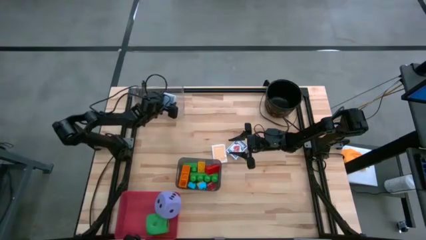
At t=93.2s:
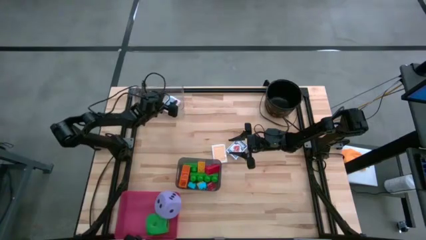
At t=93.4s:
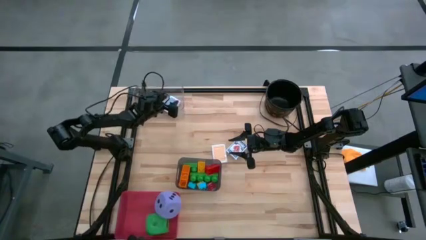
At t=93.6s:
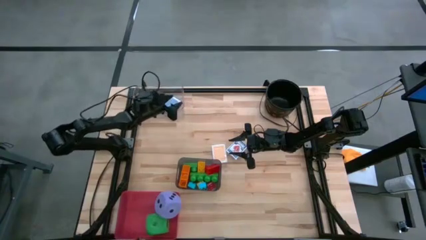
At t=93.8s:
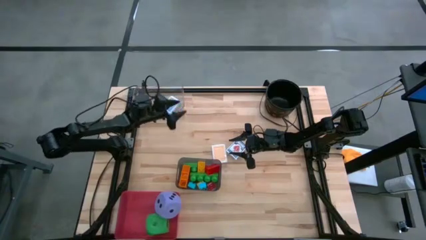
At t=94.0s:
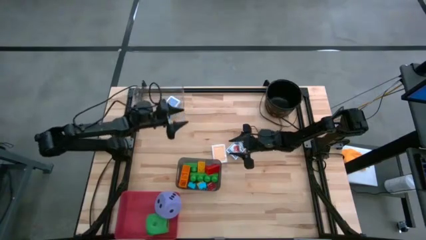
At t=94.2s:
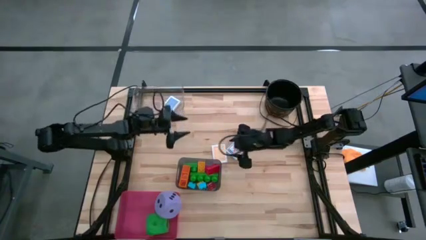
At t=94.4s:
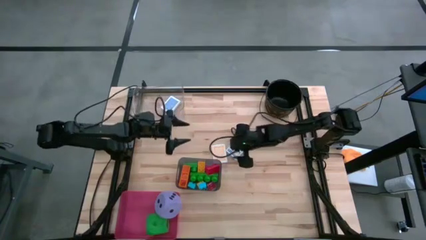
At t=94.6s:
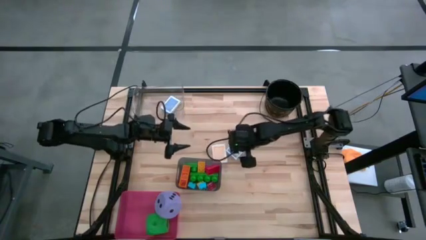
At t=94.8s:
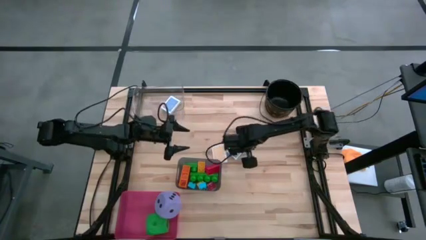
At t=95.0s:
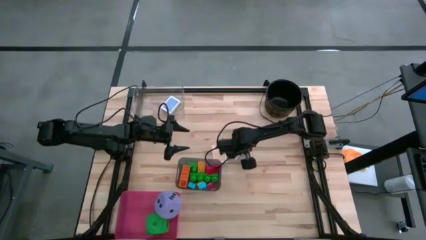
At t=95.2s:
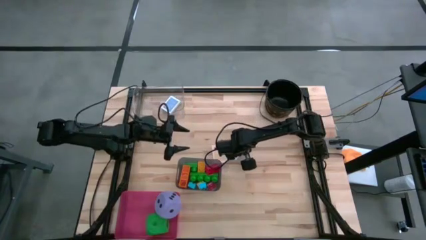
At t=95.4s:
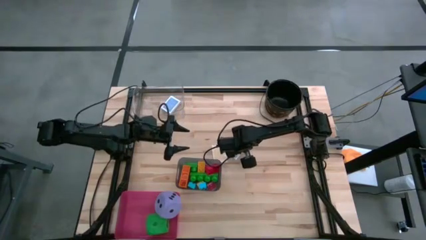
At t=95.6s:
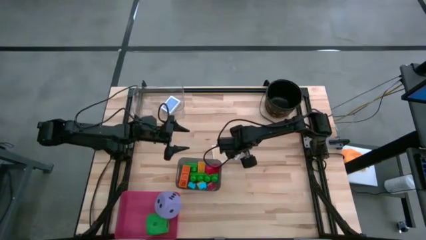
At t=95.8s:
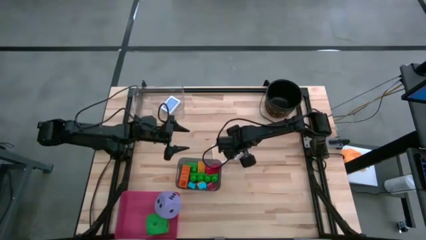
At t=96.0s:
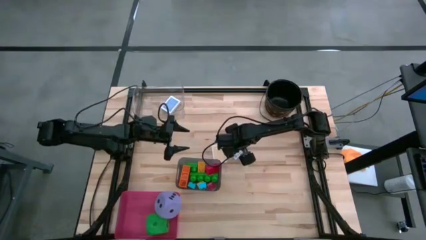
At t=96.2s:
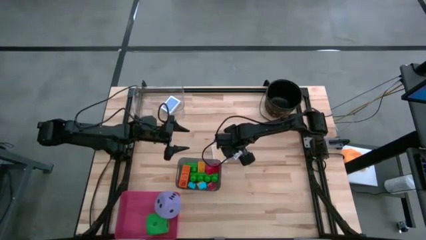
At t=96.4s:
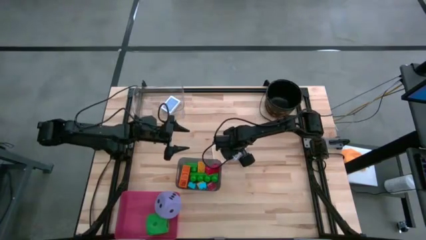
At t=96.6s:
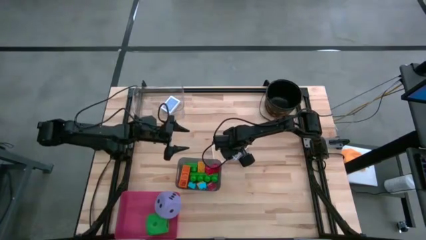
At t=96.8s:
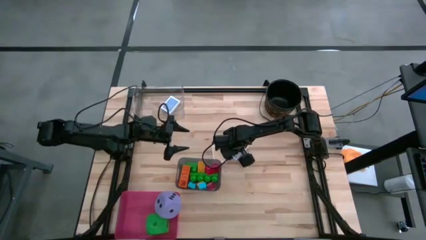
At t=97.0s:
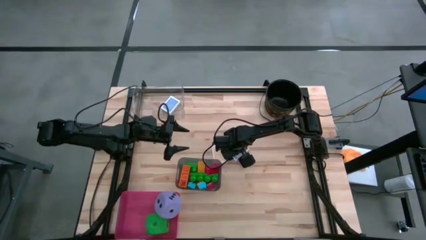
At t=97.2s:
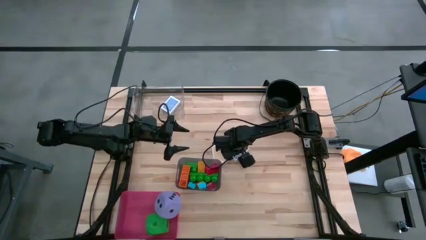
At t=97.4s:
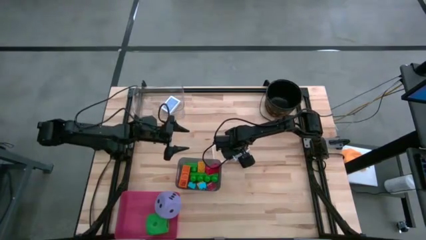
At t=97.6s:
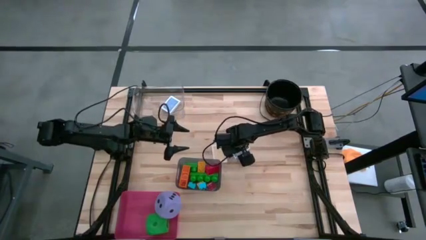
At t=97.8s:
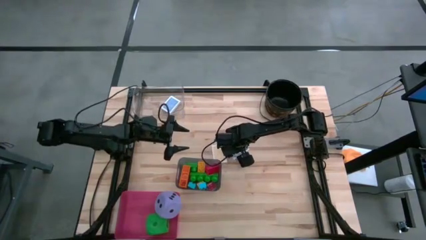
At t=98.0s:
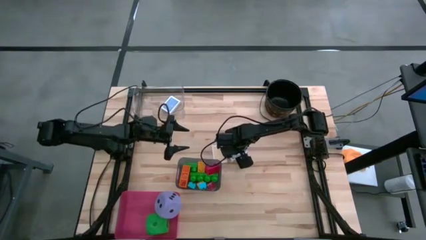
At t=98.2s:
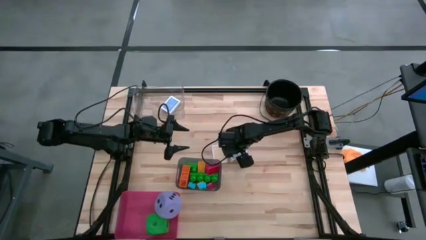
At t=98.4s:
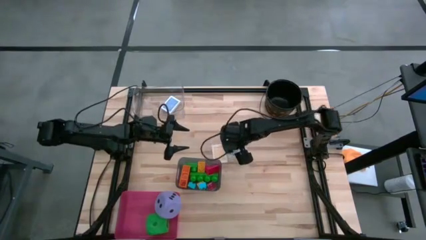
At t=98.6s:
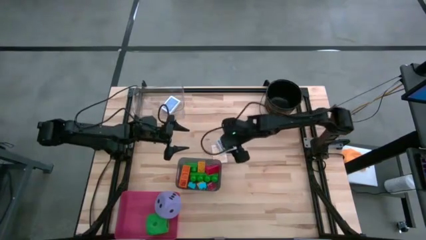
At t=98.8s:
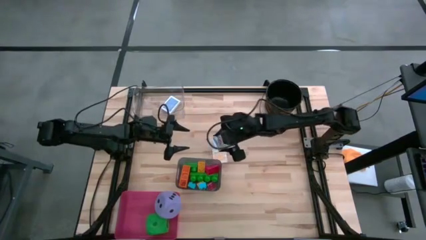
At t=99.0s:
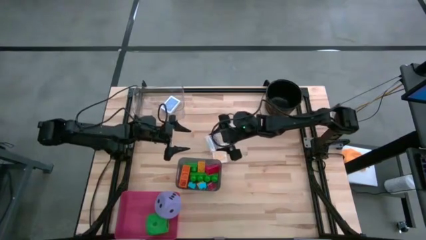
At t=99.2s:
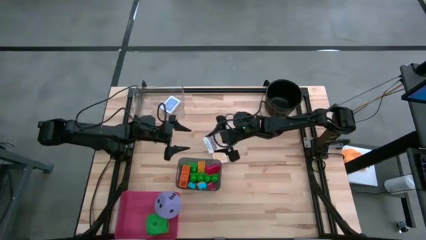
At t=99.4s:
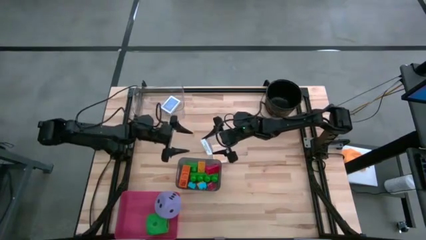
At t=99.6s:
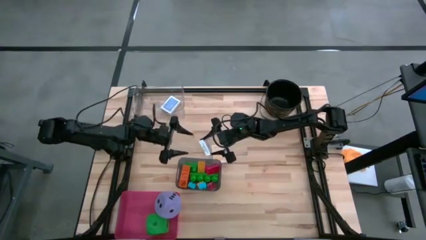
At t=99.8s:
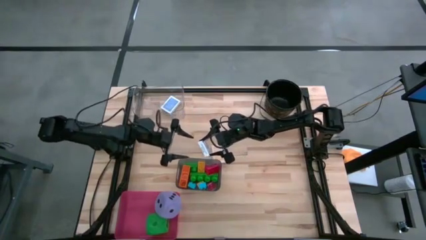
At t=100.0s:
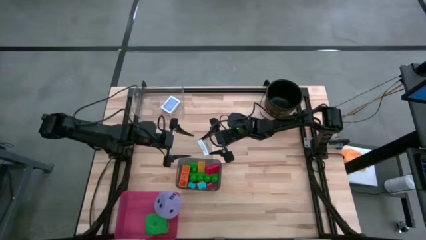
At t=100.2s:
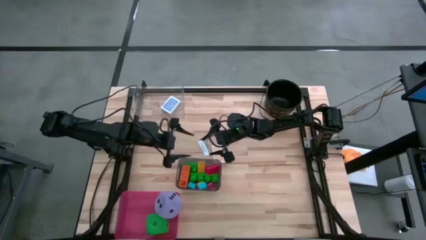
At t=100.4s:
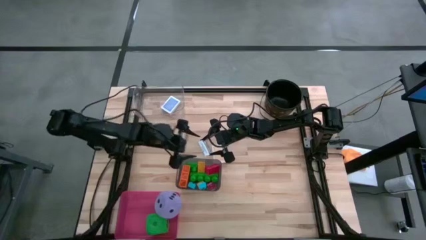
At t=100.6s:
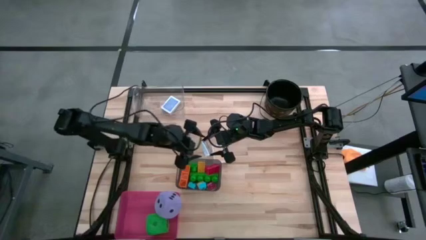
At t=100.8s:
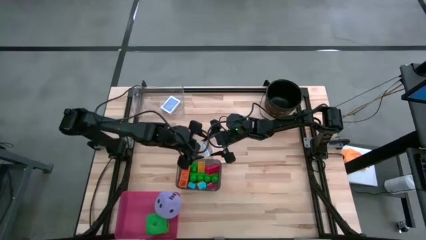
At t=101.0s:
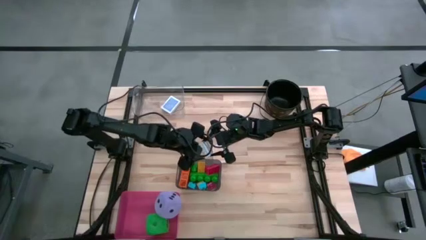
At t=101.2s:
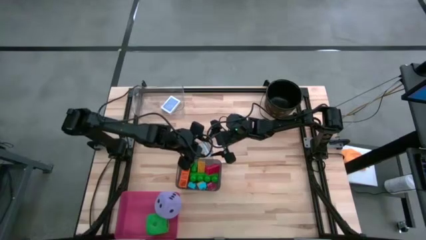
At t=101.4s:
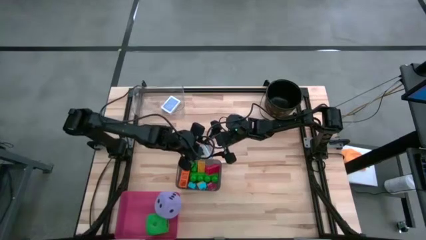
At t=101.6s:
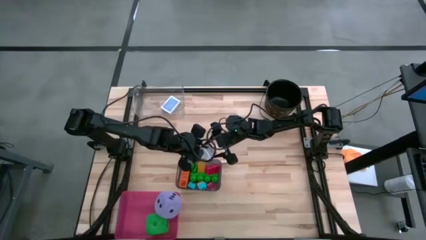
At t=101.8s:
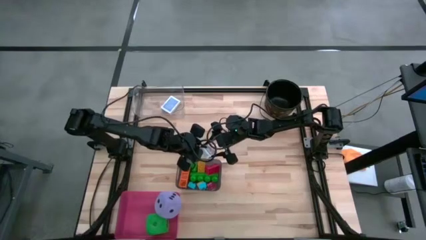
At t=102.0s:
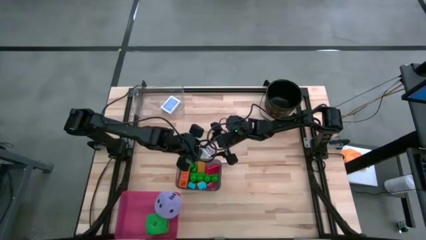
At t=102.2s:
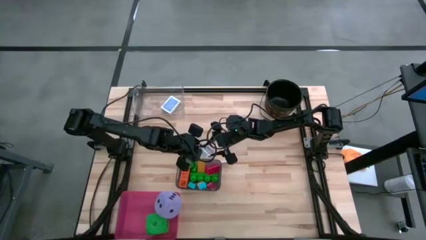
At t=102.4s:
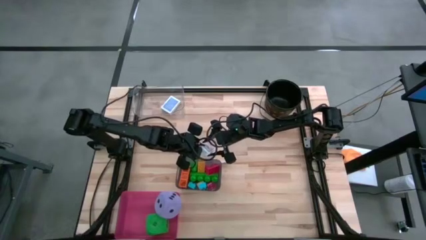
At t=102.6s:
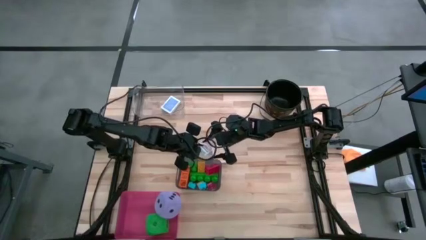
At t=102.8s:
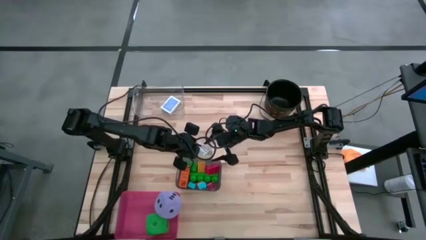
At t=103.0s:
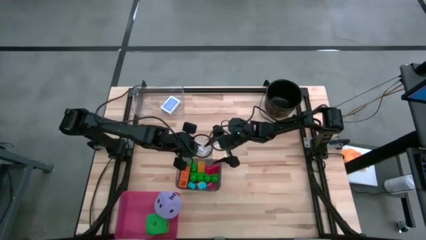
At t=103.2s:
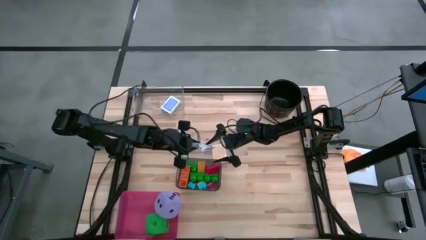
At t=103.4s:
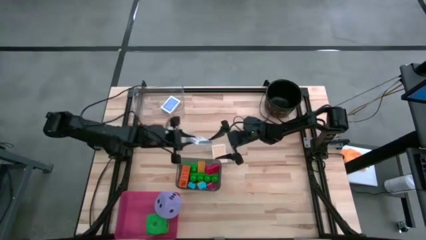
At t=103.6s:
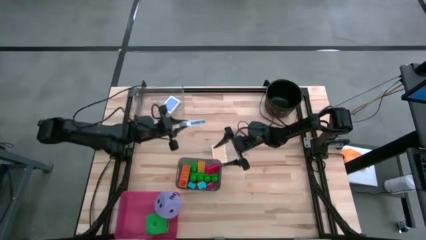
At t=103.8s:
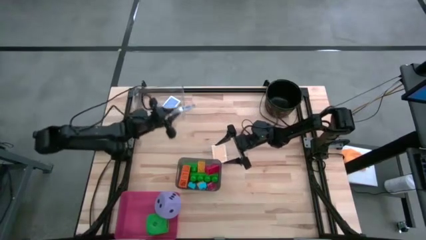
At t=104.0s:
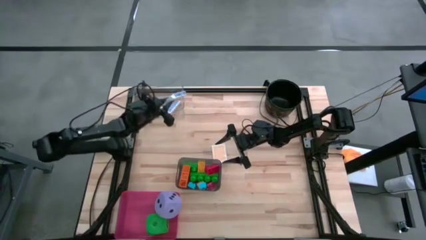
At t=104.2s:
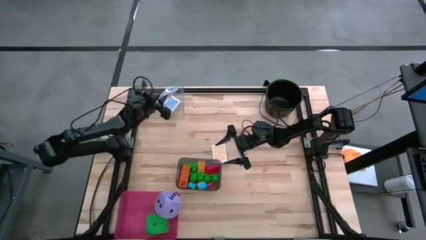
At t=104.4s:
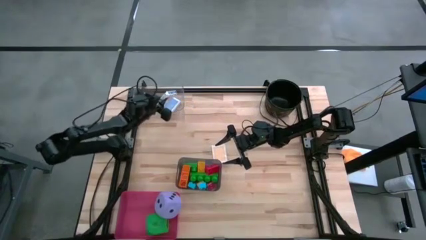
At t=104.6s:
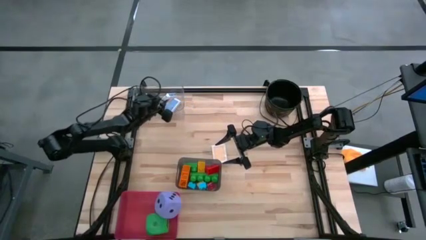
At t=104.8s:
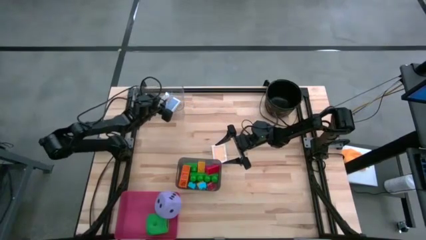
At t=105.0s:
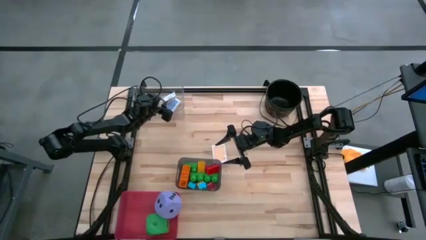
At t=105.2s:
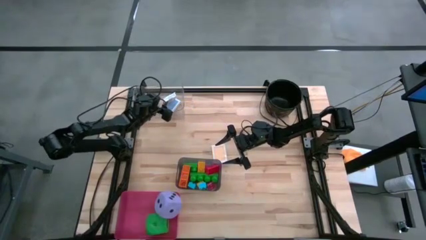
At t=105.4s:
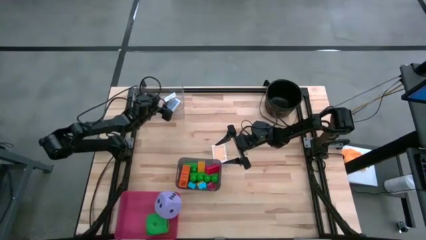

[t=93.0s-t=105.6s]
Task: Pick & Place Toys
Put the white playing card into the transparent bin

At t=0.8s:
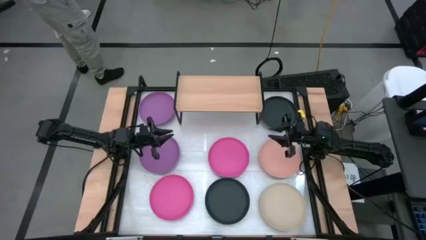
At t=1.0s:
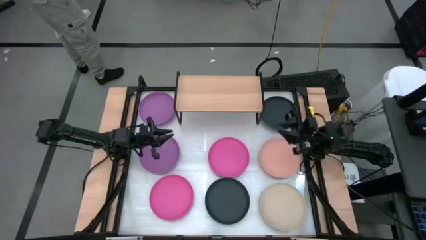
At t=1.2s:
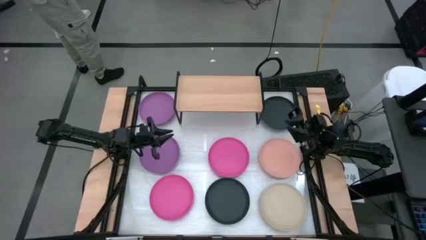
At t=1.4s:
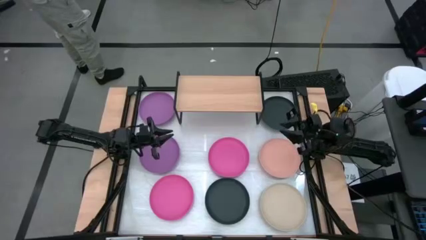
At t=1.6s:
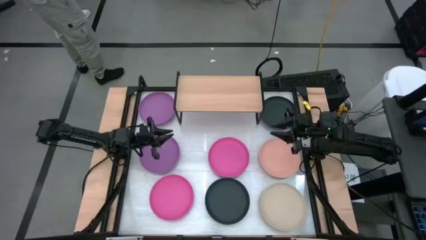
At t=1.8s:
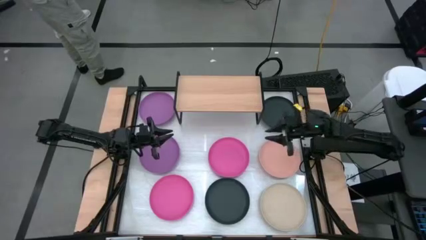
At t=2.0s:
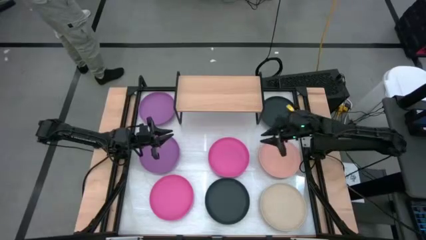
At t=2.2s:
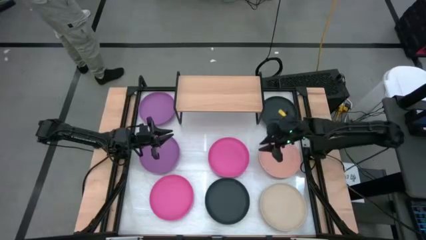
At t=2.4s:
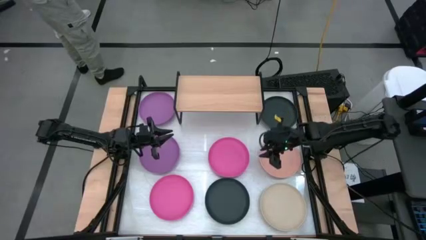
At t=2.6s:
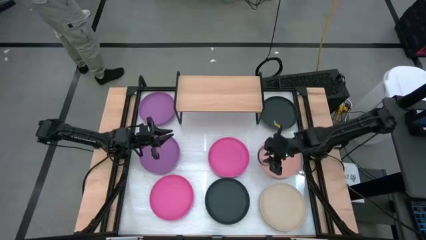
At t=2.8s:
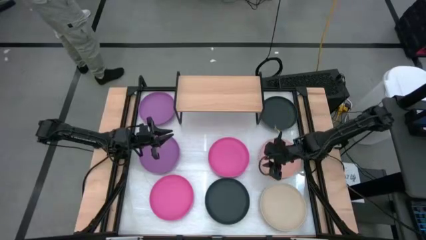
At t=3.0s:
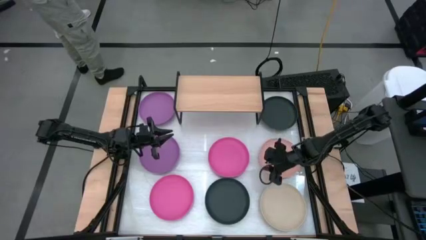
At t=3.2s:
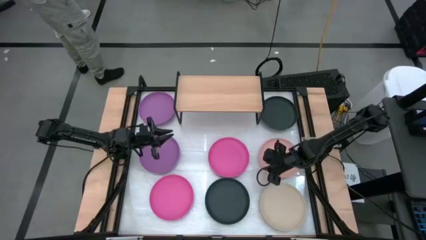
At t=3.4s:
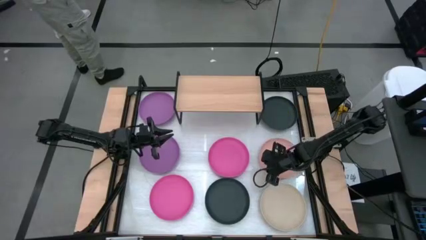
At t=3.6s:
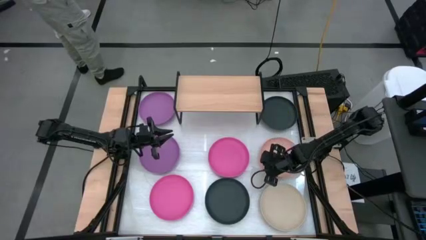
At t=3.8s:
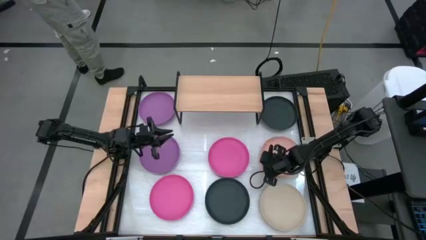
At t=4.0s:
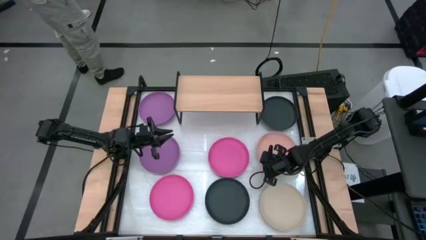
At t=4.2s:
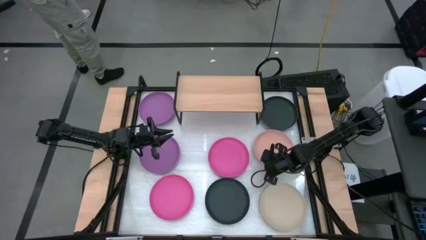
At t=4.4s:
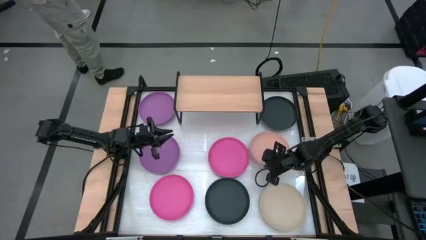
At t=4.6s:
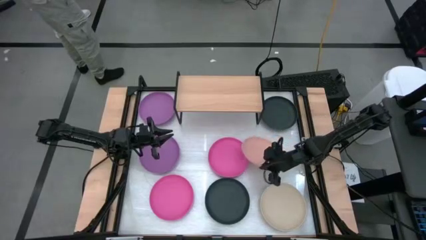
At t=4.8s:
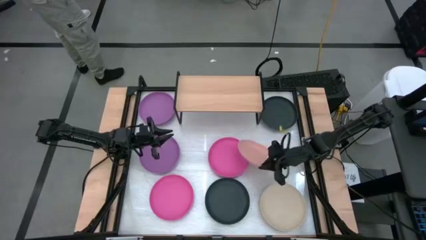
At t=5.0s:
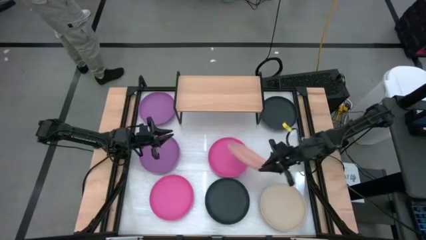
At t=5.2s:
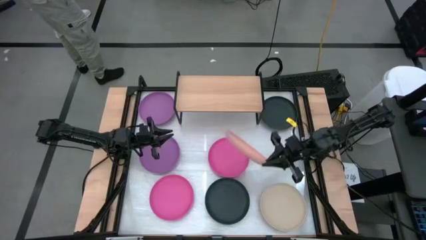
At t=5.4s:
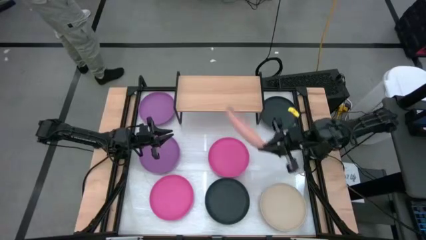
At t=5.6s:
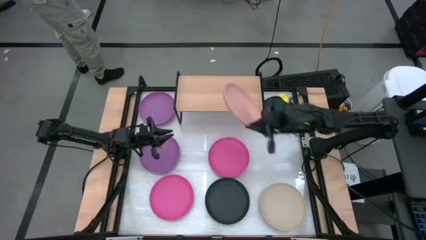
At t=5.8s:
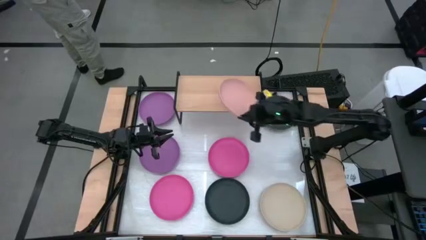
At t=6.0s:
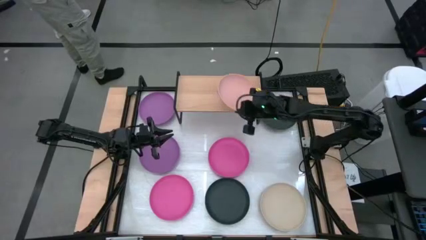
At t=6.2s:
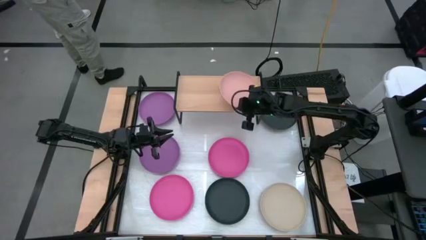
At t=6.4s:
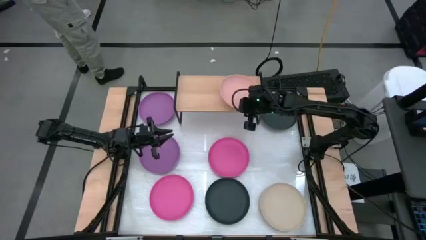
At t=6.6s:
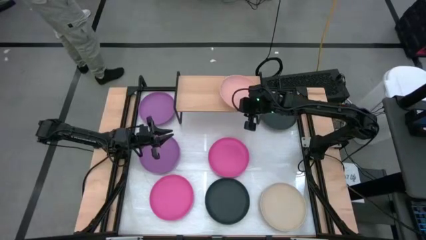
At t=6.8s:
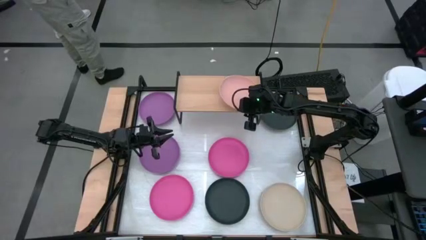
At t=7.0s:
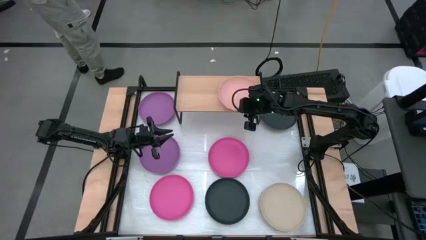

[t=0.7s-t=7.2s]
Task: Place and stack plates onto a shelf
Put the light orange plate on the shelf
